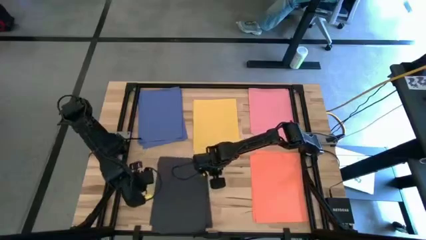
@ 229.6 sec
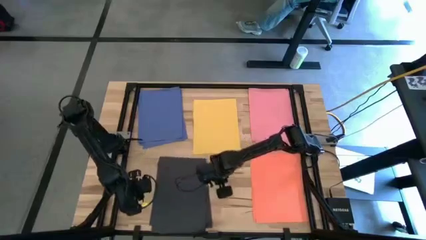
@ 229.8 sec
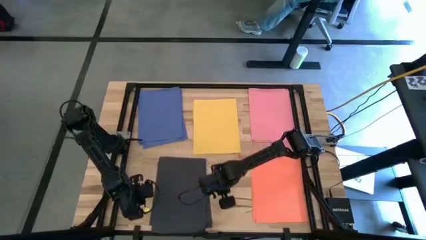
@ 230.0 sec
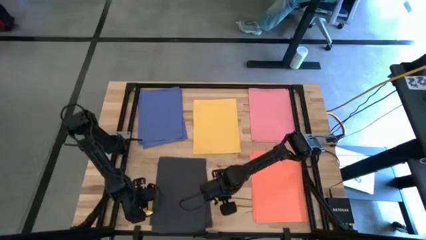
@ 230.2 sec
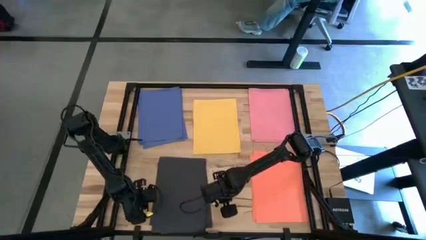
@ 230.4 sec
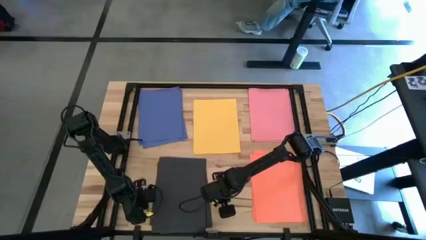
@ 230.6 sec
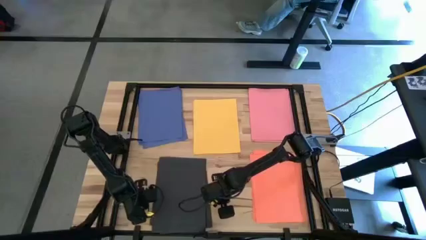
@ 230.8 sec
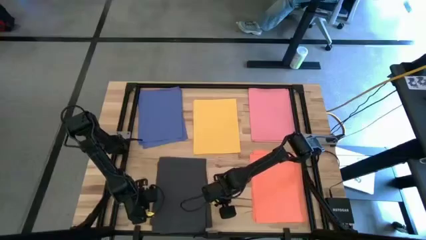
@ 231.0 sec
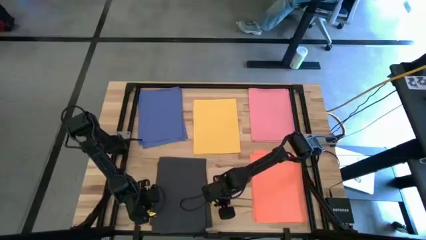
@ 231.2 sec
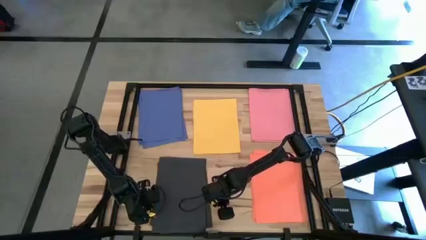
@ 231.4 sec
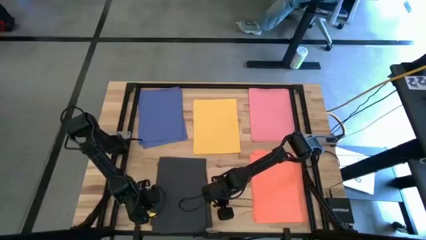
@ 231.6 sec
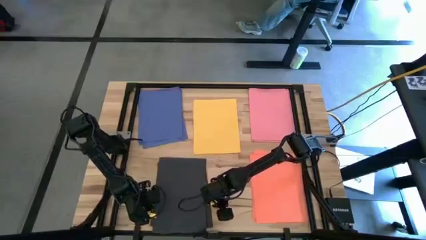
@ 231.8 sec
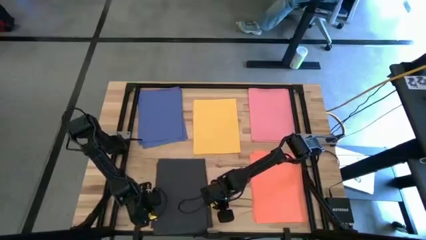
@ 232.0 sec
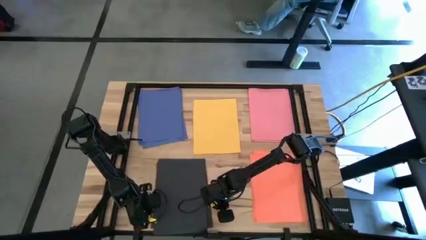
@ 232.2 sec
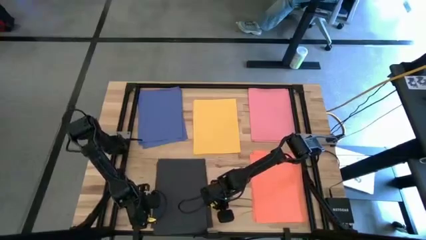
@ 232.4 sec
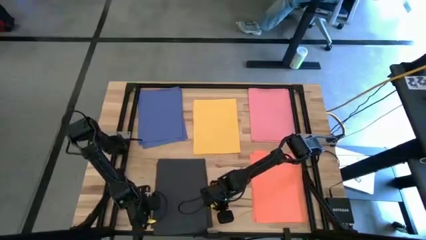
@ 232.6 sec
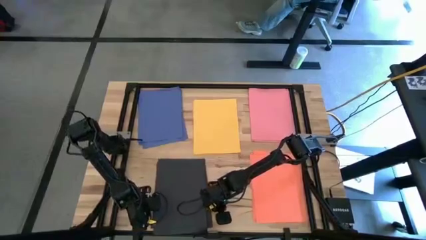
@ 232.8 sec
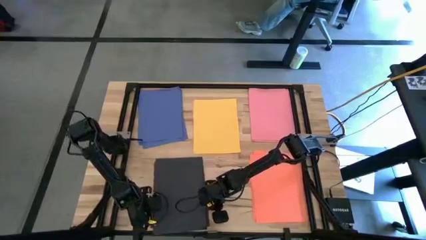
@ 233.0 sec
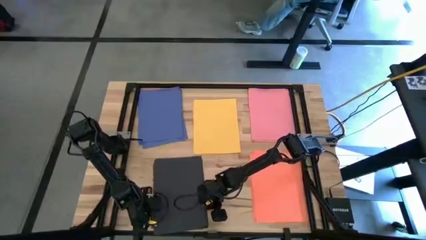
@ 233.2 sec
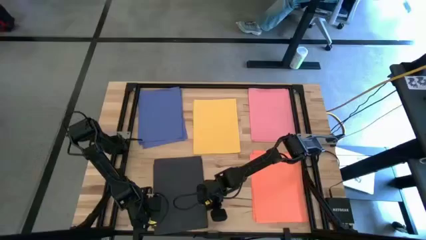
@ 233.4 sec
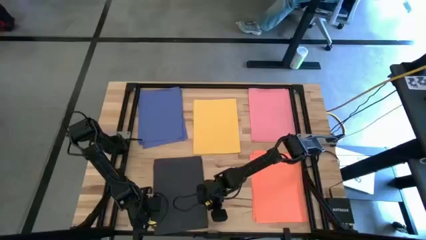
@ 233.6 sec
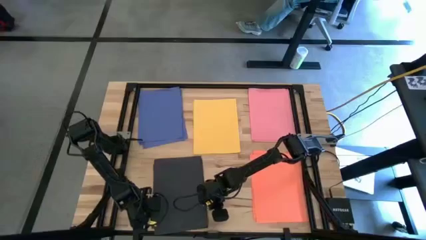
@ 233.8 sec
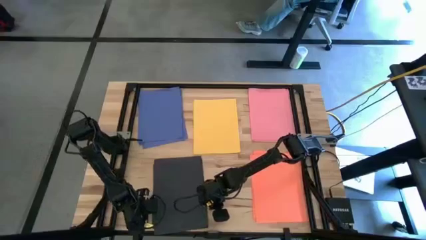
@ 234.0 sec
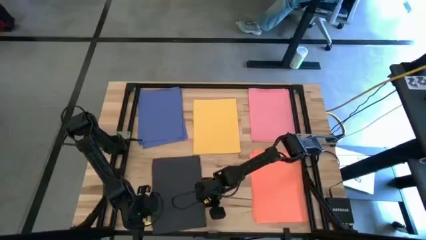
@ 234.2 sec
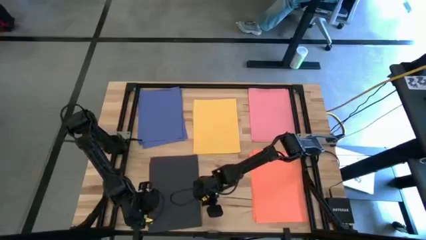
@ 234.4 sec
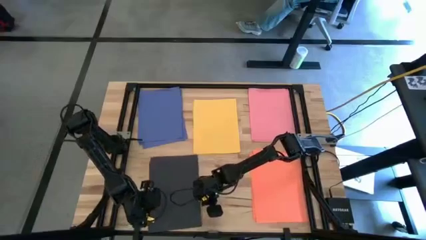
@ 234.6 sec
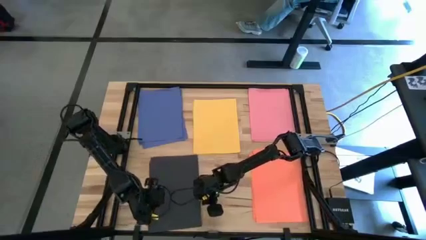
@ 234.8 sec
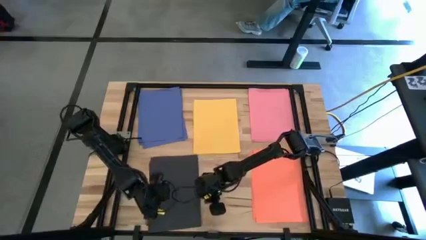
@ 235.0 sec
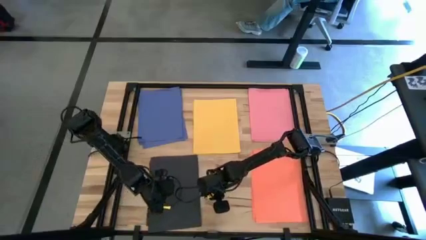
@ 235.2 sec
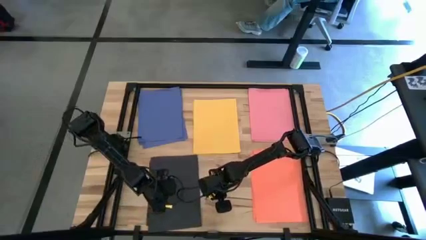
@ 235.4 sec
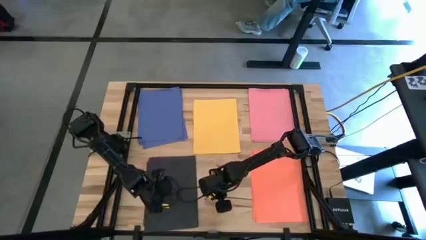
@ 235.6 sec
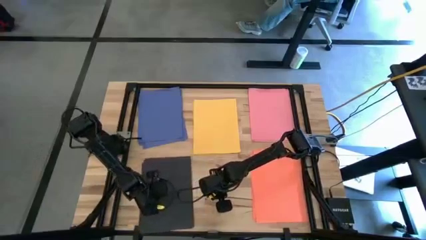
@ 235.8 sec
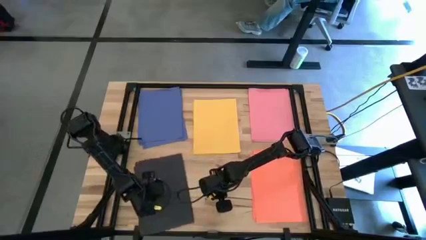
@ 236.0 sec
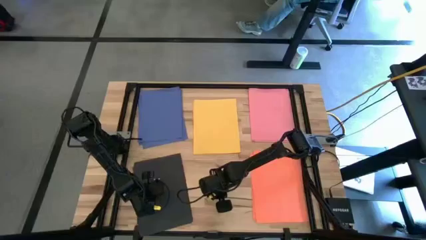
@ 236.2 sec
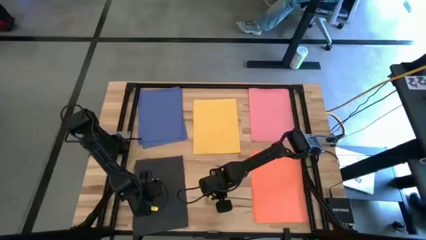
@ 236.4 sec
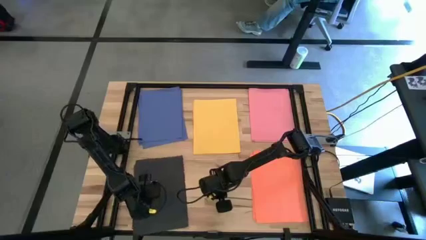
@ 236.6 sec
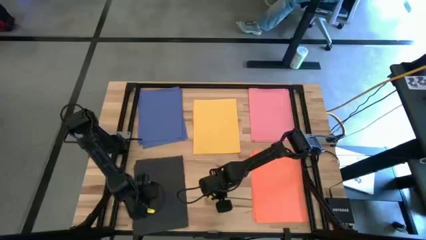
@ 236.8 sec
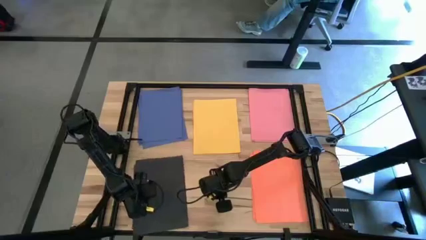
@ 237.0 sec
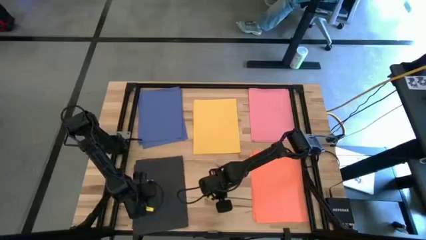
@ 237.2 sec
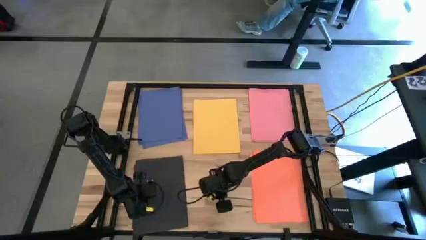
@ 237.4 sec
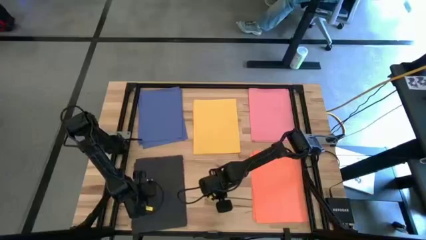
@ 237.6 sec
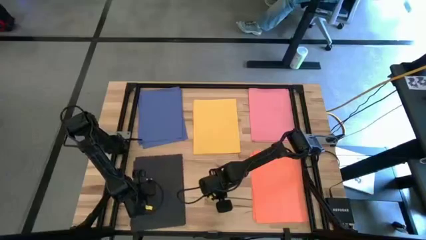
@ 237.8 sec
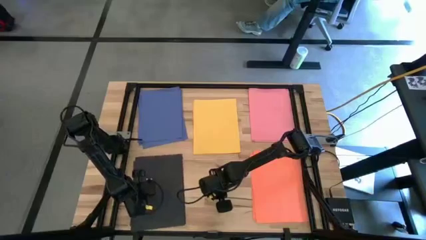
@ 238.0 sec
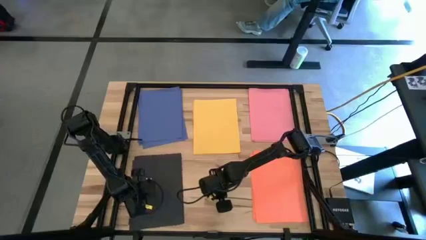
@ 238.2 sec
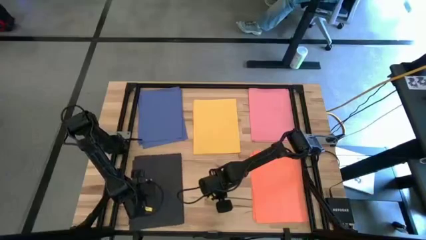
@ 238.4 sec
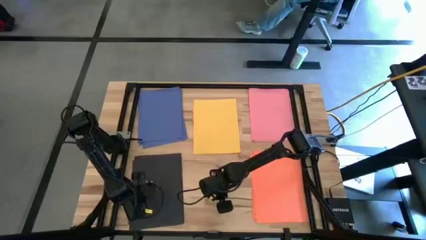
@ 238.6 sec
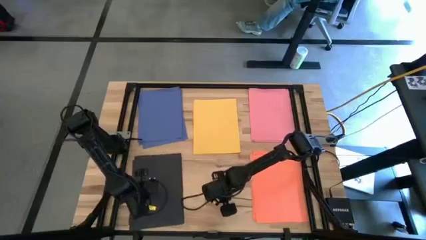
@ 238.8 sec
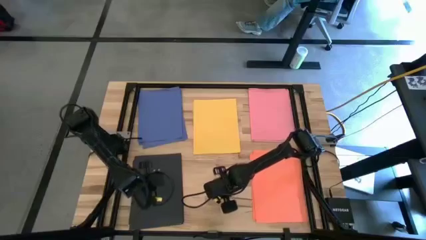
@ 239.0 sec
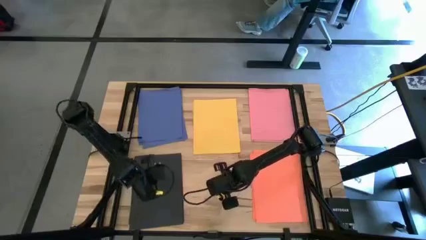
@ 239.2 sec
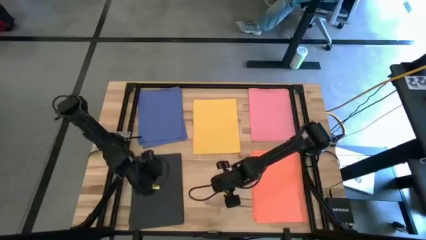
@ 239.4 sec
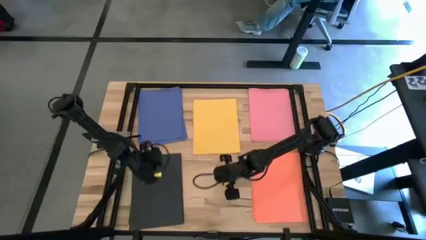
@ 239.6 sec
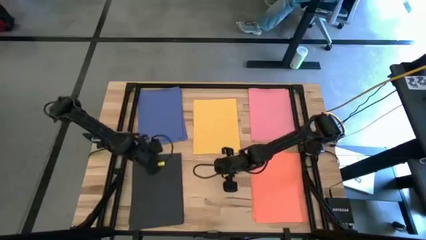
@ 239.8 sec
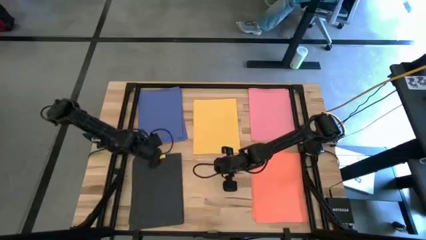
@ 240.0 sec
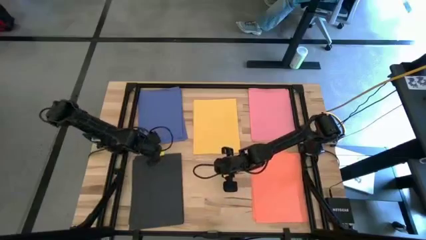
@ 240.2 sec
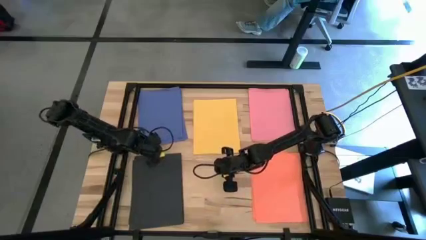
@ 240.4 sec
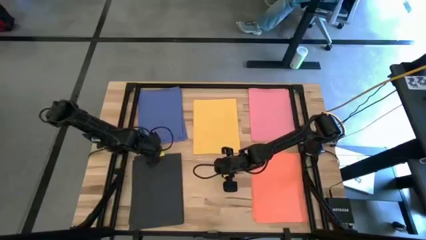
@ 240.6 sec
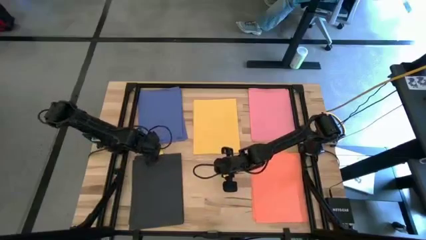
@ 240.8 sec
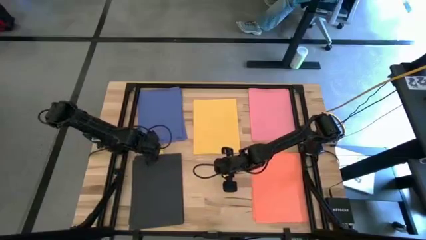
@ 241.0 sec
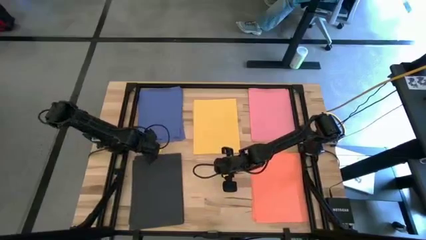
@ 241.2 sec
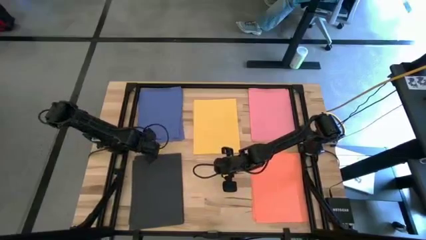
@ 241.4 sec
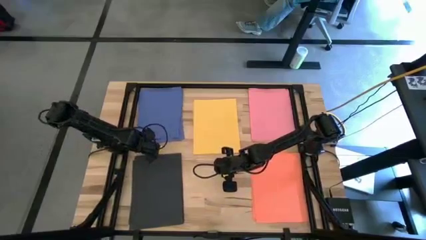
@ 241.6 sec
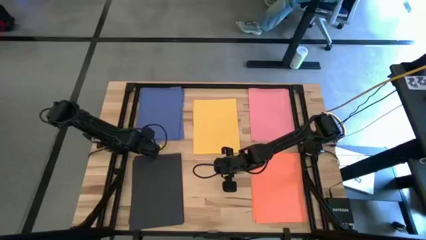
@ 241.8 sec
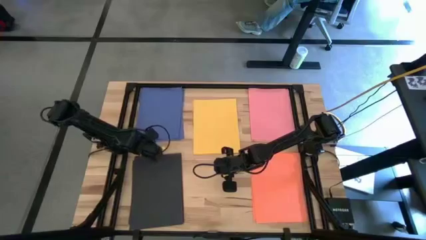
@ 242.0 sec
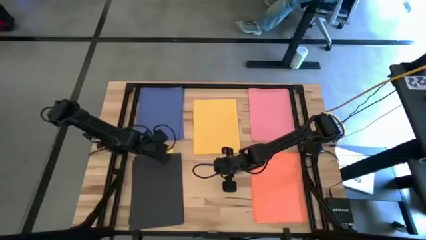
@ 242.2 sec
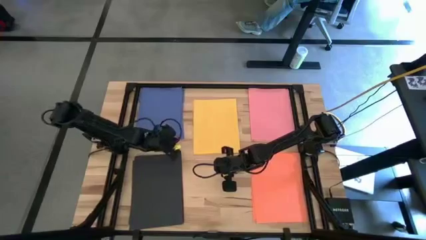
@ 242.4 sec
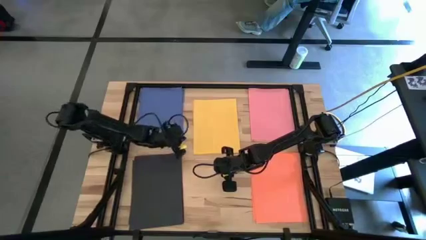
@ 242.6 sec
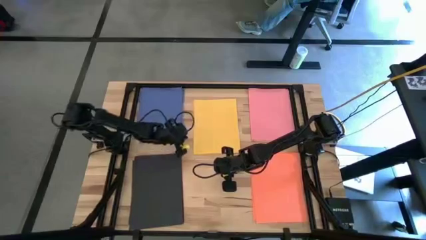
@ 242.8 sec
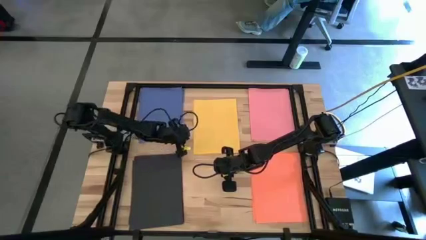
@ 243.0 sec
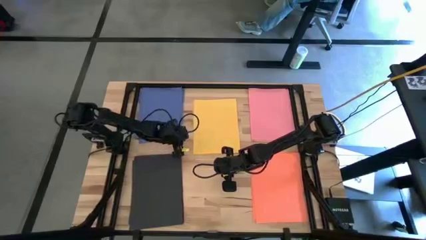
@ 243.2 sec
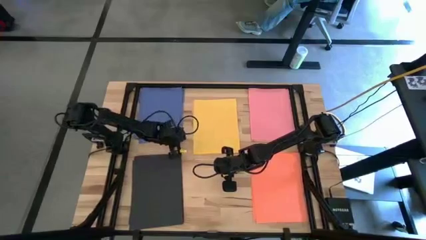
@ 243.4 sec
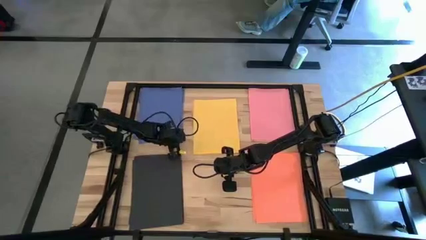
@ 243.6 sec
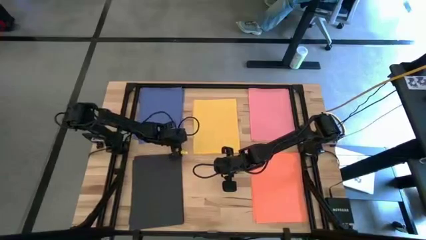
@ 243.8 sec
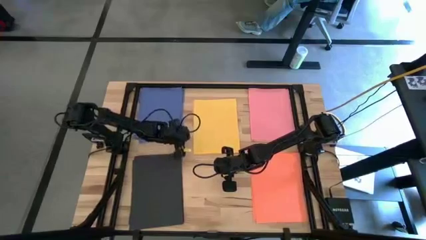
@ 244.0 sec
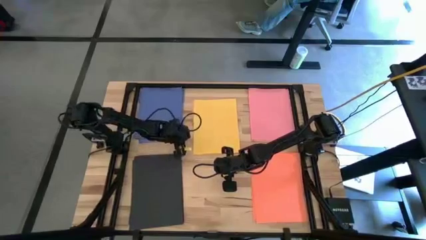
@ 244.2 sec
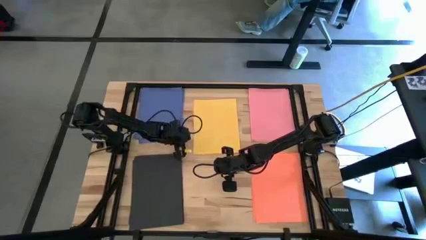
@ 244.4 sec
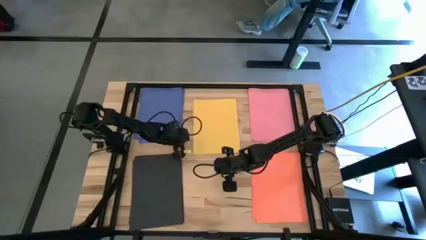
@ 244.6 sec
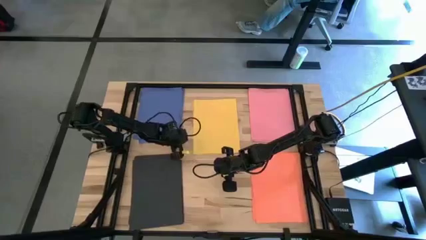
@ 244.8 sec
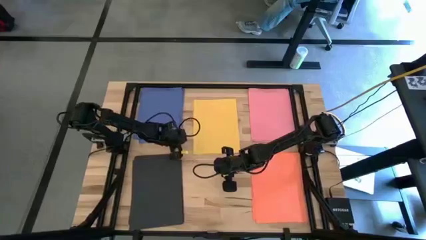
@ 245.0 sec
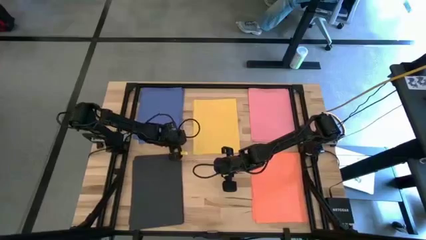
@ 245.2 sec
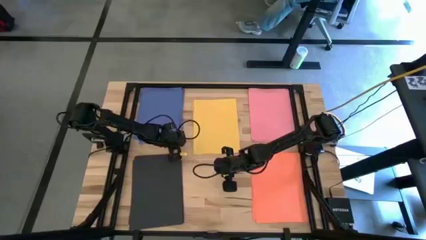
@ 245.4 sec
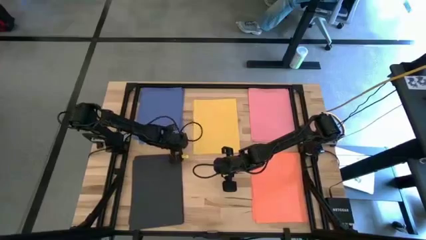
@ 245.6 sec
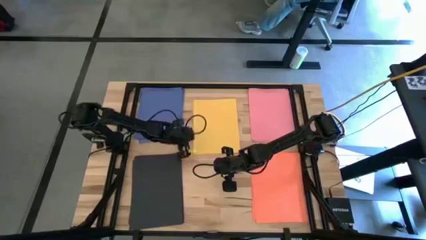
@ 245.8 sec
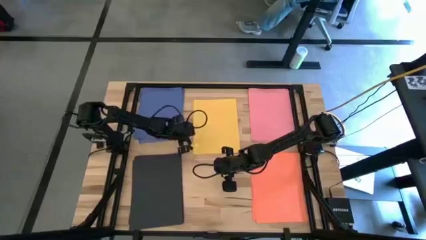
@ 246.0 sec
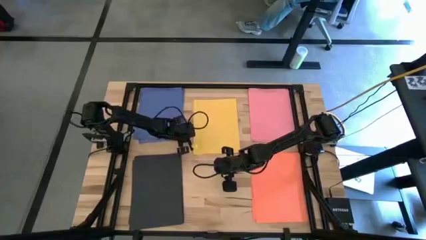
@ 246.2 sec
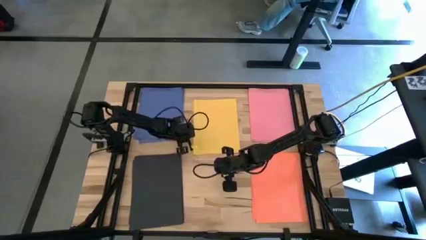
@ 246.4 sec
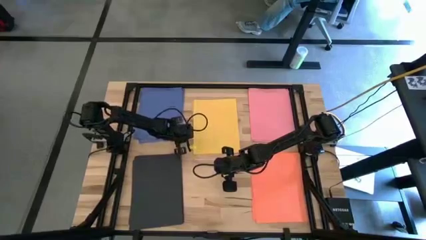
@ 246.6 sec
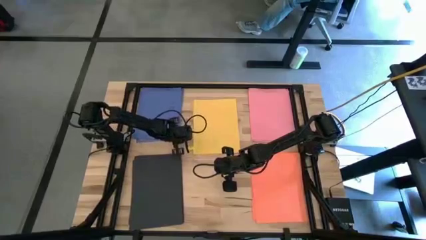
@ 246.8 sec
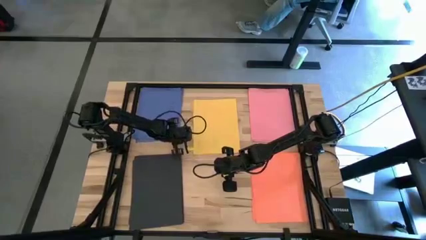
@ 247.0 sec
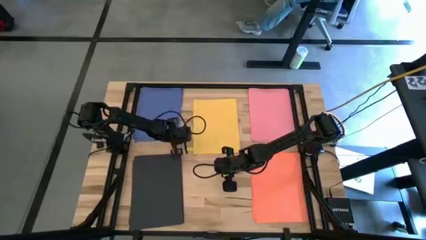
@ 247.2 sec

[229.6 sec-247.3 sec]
Task: Organize paper
Move the black papers to the bottom left of the table
